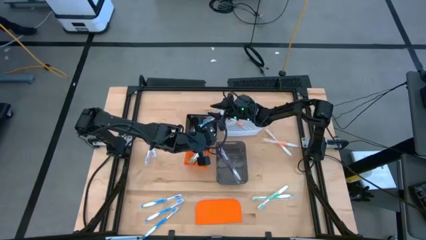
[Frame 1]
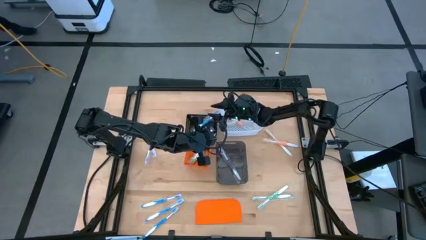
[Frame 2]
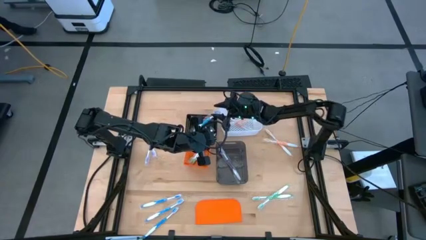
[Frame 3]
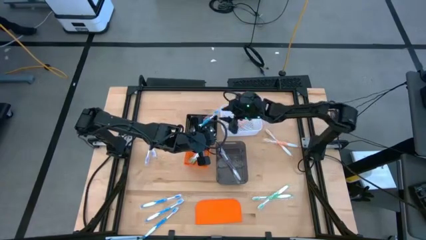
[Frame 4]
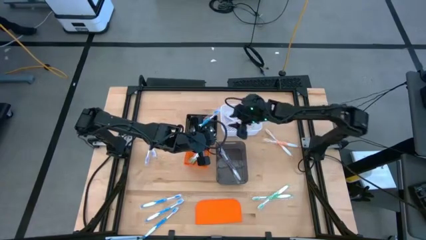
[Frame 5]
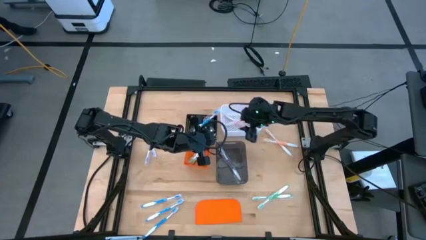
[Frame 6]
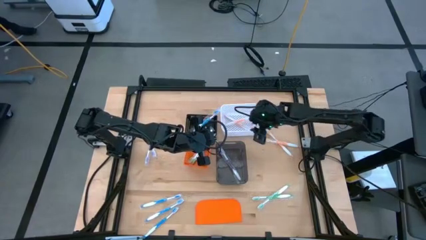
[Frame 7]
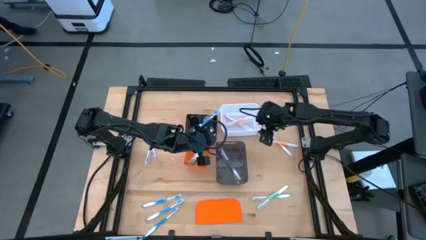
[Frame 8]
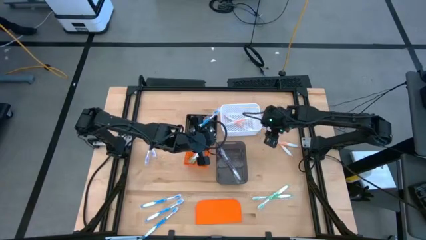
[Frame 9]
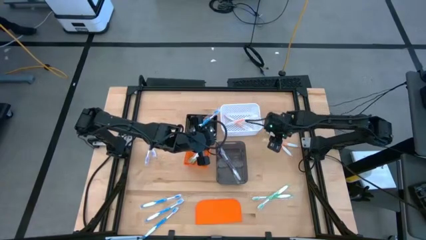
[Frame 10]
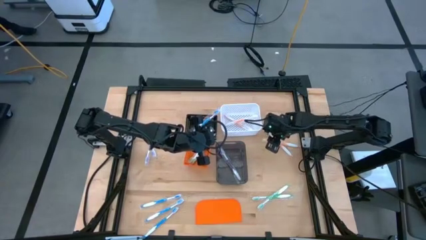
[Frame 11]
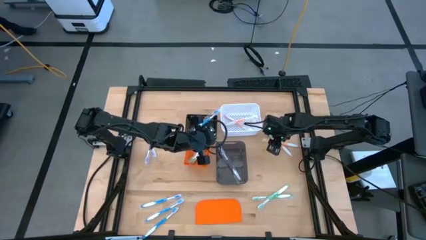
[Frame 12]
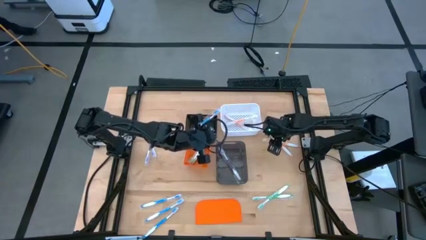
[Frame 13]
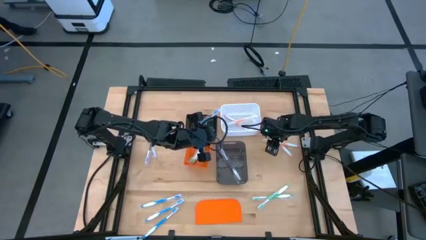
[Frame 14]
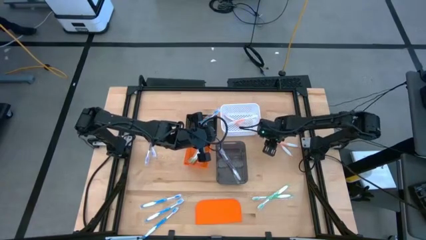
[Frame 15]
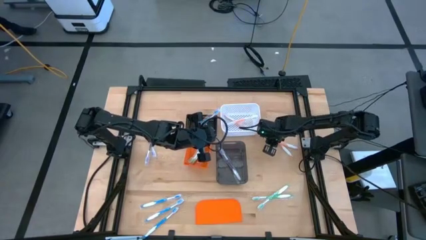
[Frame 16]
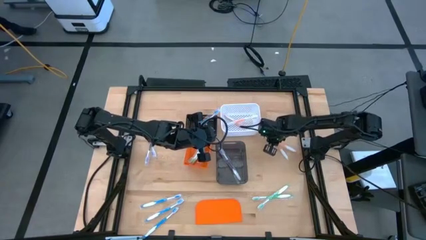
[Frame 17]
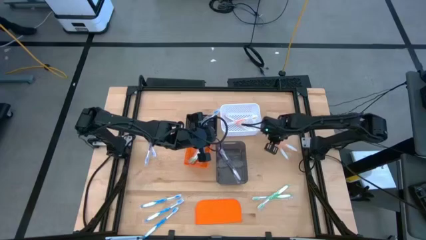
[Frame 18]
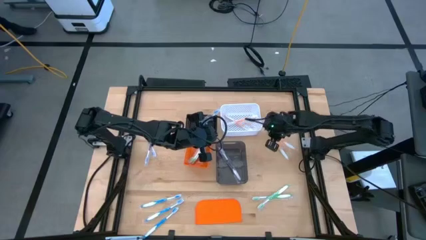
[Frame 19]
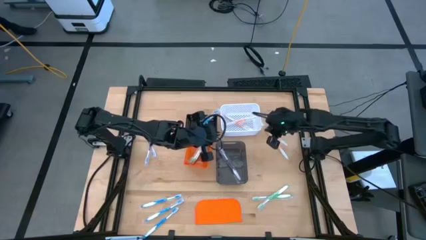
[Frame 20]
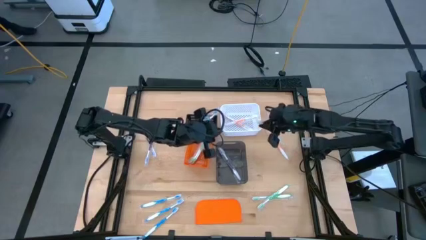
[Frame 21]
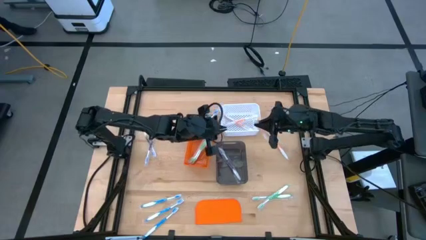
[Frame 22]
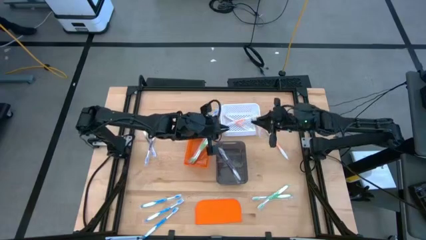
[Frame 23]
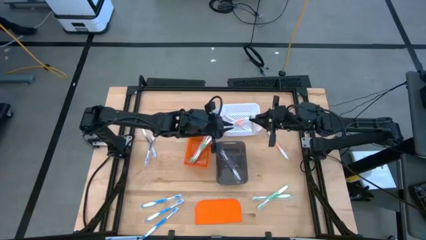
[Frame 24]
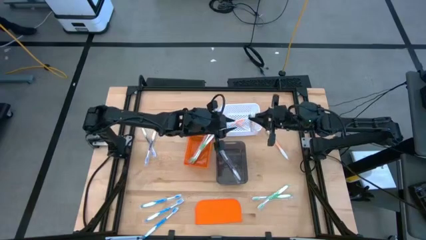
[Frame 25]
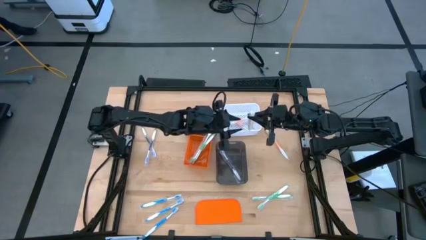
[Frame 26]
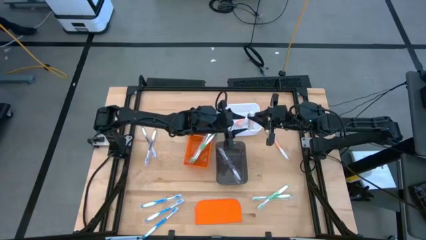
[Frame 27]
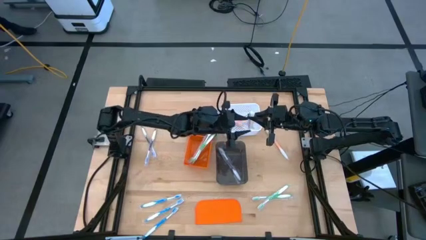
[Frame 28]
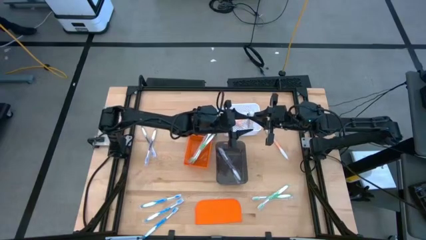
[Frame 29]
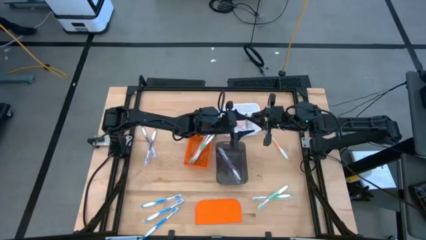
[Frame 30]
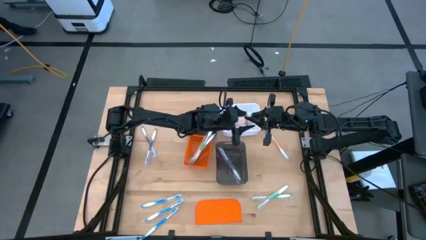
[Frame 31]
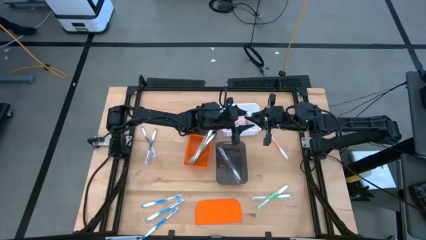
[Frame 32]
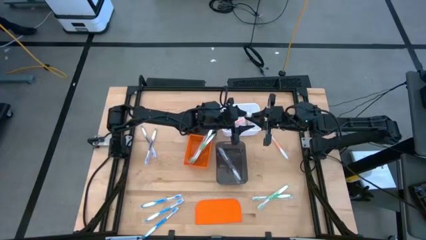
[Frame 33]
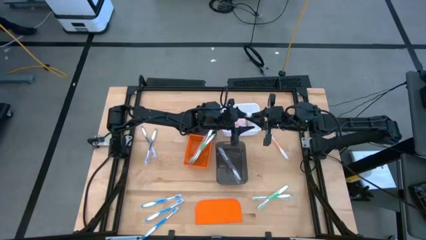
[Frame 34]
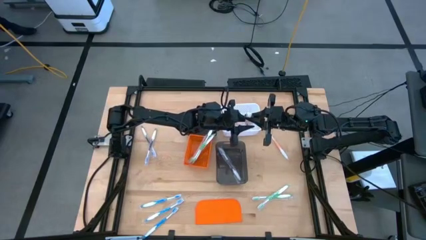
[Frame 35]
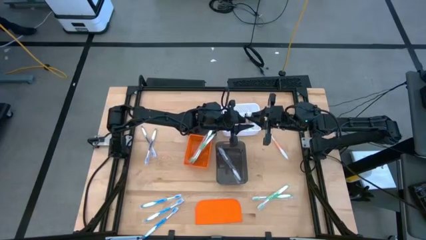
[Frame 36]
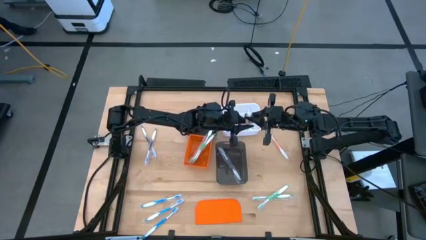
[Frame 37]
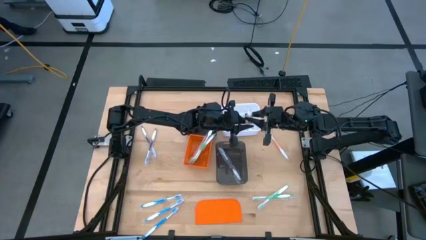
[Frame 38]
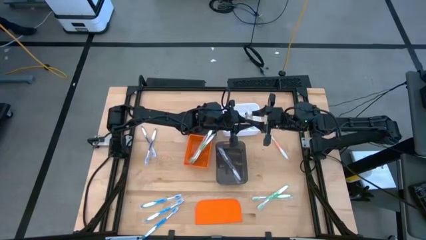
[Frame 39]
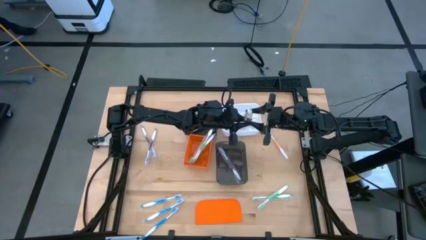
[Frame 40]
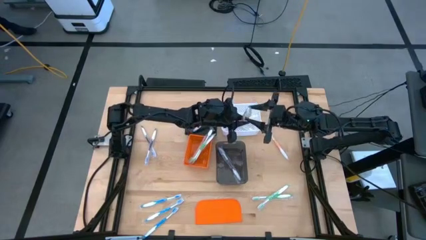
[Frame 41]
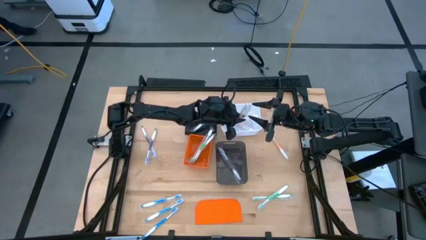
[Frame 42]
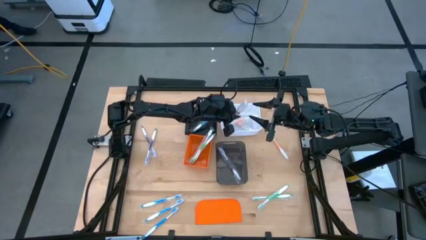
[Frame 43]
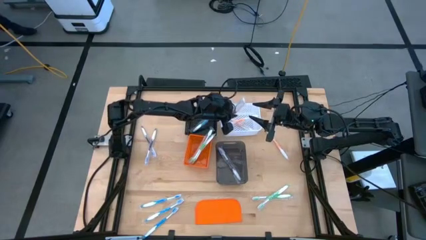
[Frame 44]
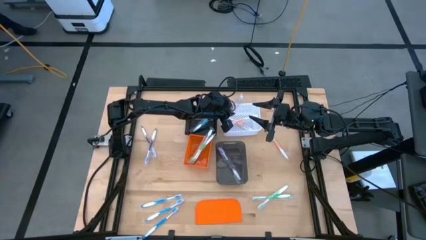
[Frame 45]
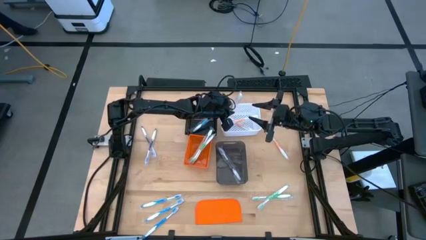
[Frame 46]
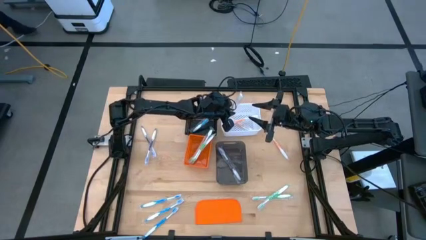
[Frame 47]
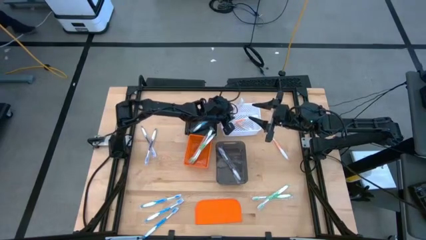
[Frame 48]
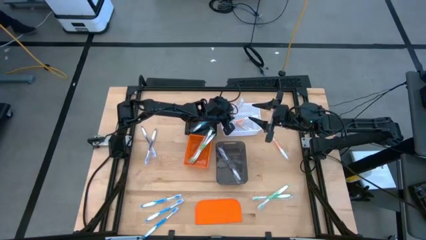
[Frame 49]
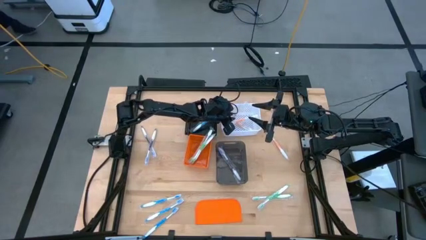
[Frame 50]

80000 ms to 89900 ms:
Task: Pick & Place Toothbrushes
Put the orange toothbrush into the white bin

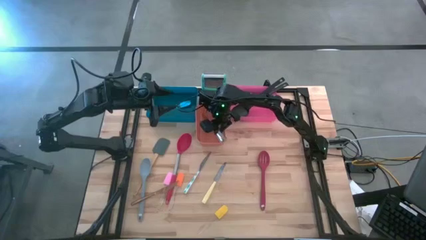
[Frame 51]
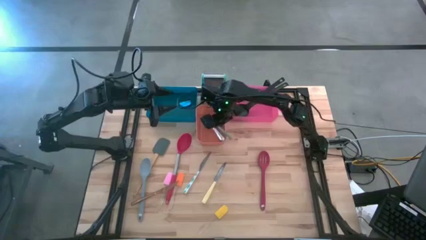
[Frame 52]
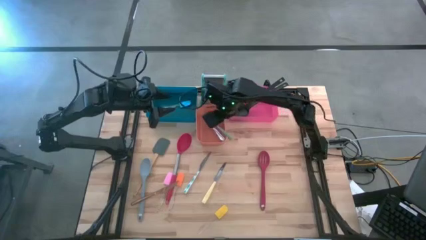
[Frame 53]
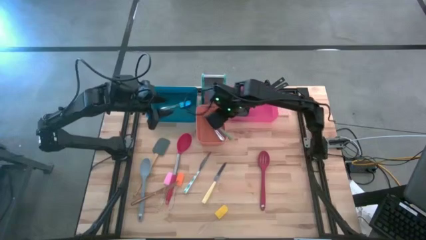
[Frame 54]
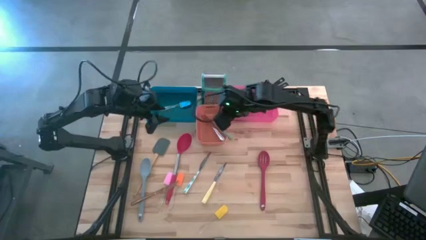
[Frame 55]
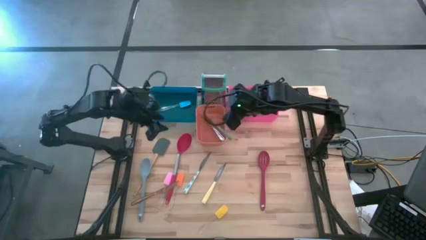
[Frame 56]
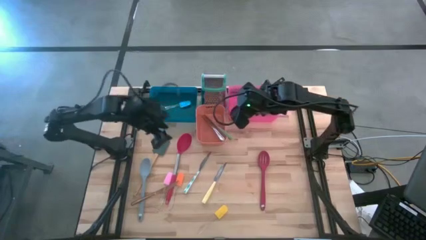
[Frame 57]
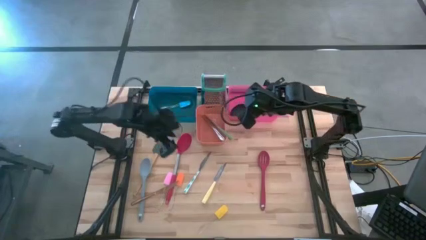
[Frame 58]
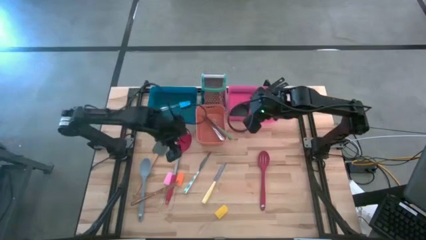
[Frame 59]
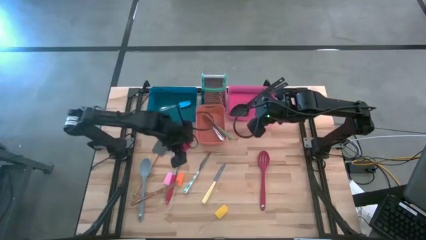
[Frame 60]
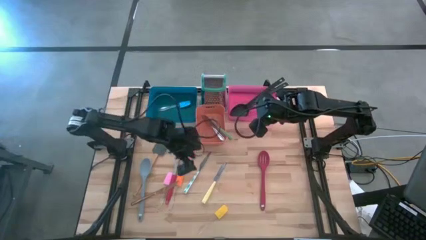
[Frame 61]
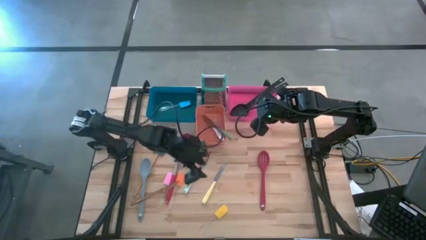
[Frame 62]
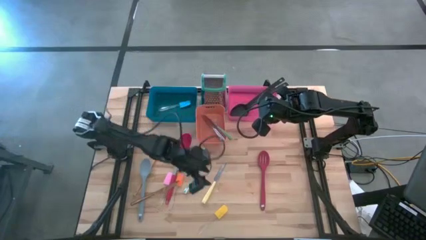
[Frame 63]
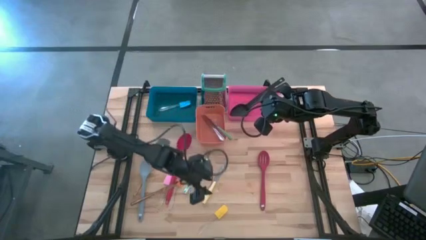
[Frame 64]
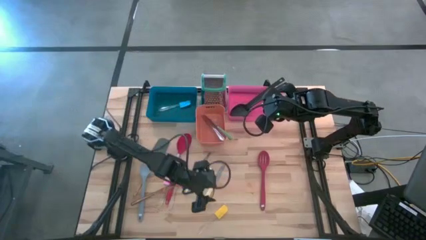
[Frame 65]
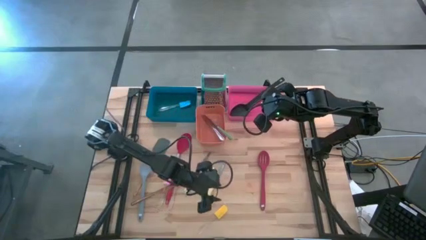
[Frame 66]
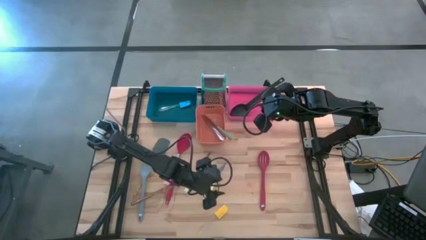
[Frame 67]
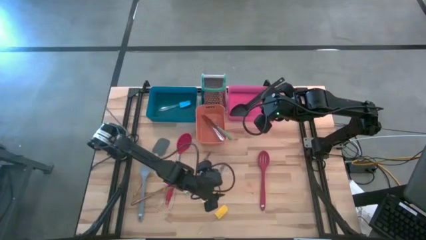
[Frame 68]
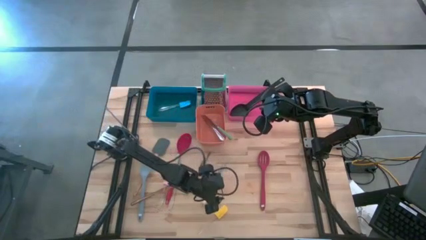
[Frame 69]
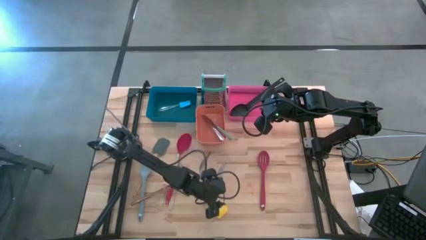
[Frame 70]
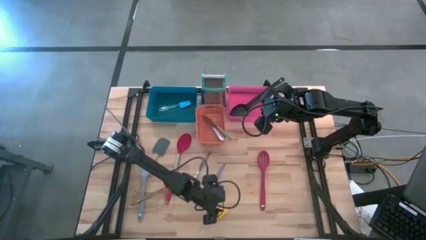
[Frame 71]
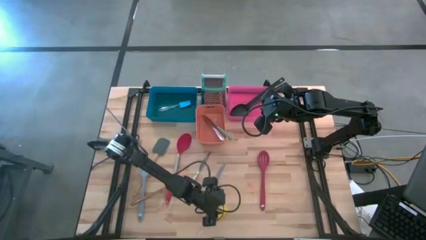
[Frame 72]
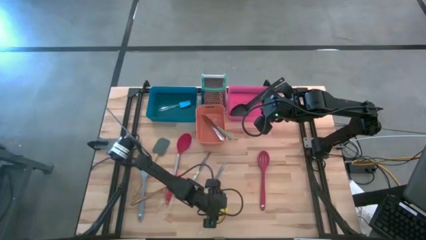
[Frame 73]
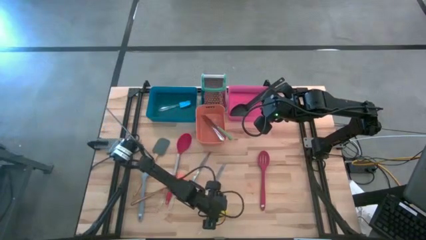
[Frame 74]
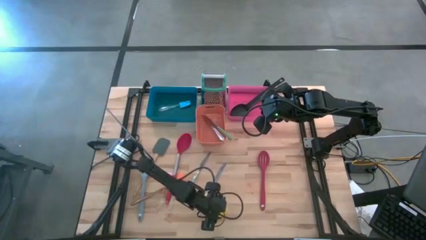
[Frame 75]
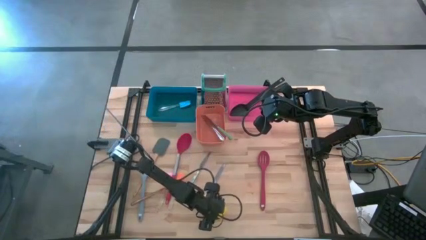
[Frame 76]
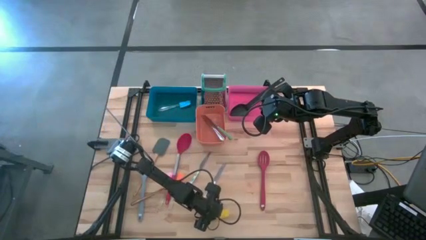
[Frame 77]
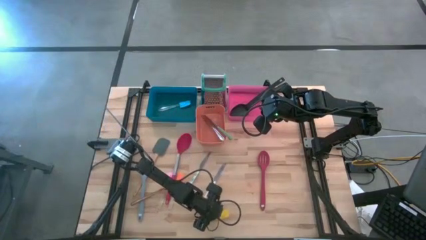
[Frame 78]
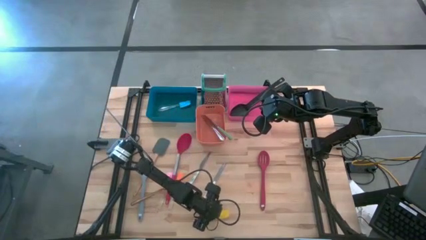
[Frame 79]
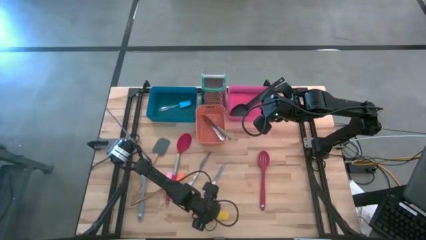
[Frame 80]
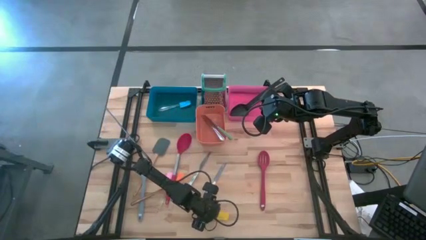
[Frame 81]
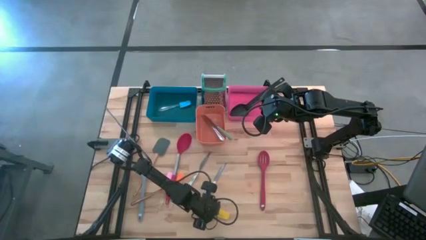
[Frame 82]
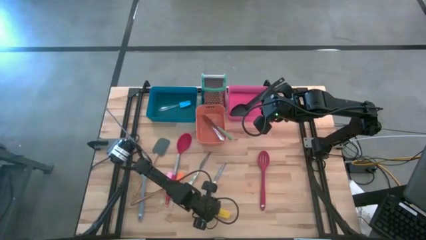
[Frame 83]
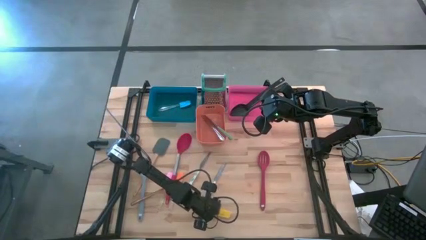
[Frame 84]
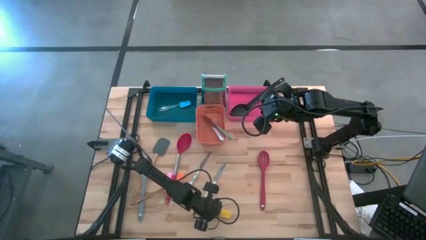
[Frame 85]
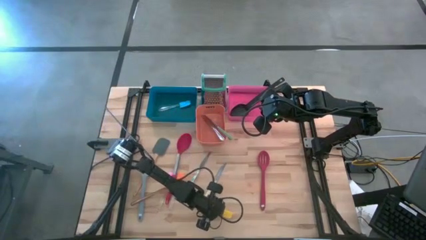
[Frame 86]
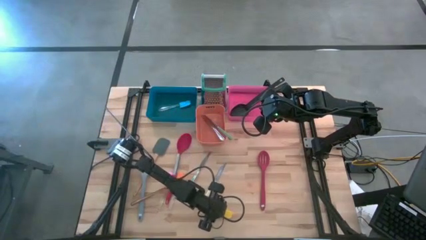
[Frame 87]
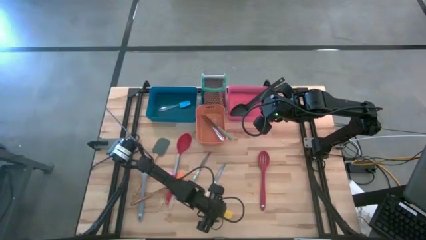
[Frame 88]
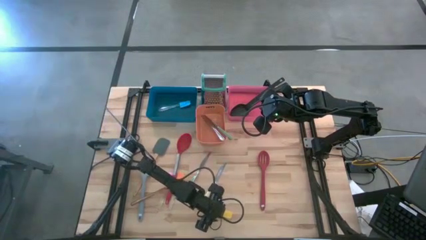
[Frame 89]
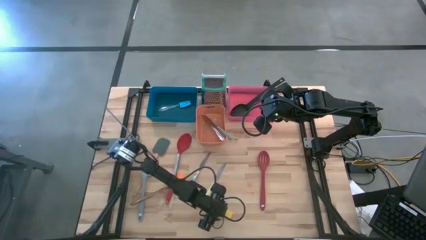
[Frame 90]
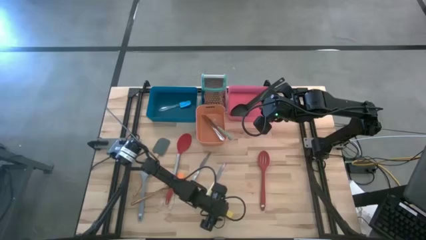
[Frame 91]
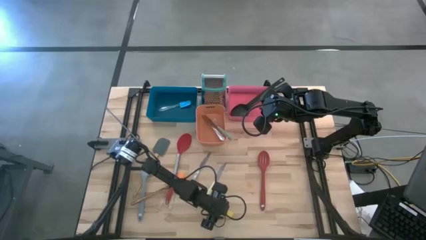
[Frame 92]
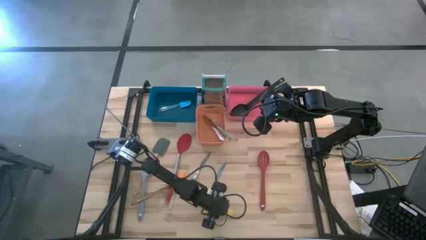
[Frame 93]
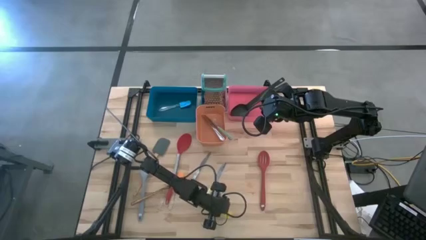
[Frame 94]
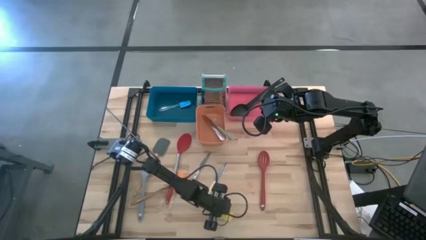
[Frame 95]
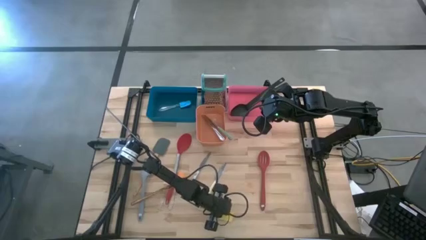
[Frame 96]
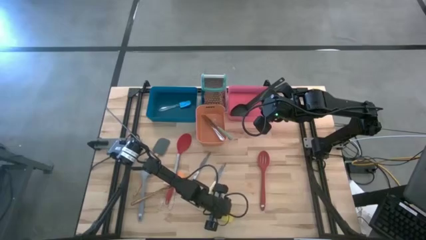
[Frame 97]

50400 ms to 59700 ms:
Task: Pick & Place Kitchen Items
Put the yellow spatula into the blue bin
